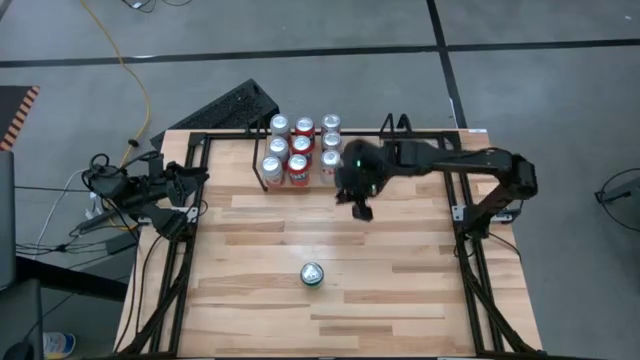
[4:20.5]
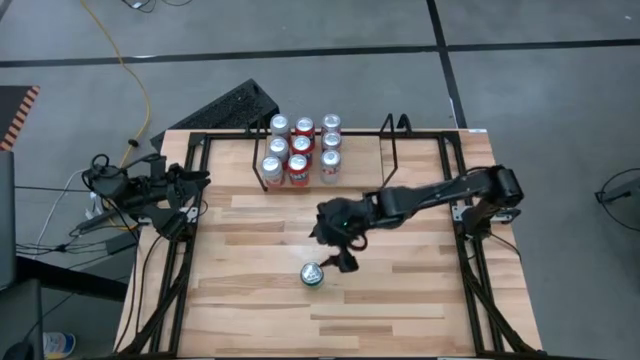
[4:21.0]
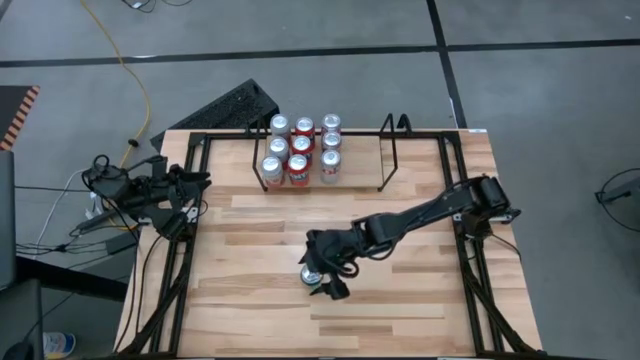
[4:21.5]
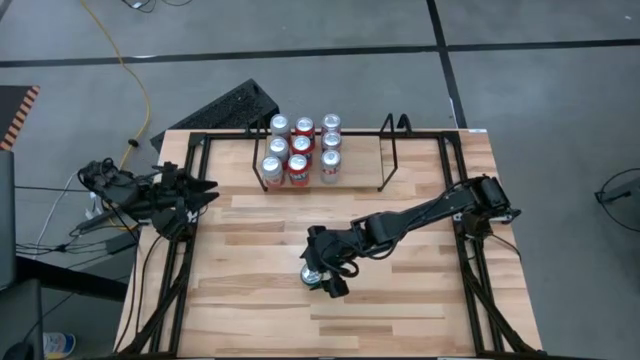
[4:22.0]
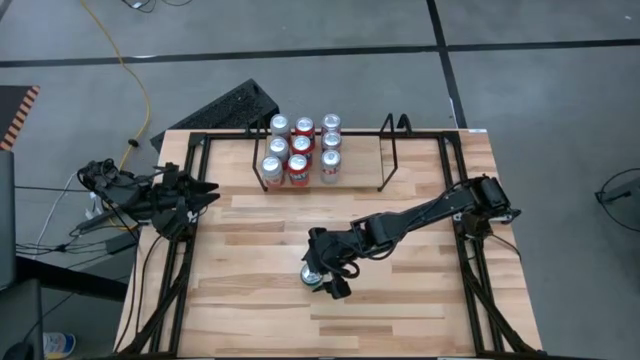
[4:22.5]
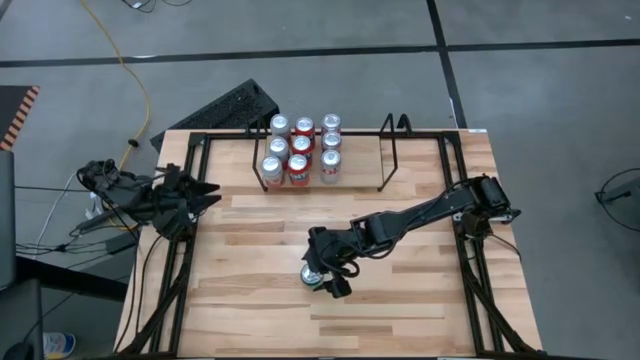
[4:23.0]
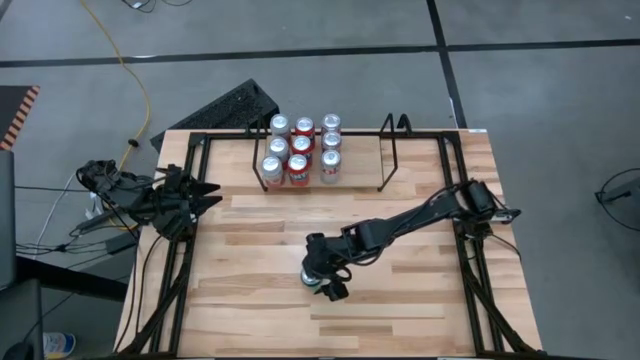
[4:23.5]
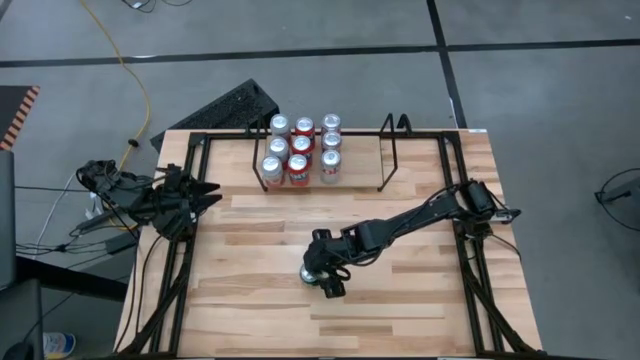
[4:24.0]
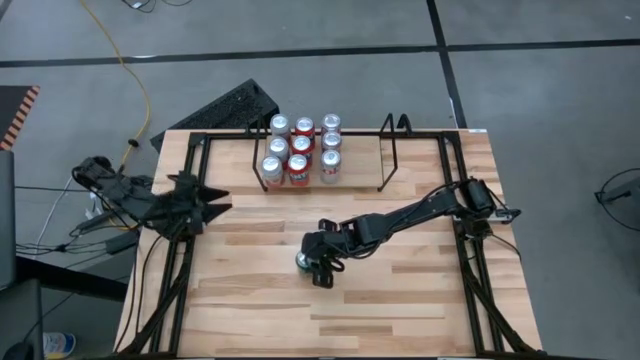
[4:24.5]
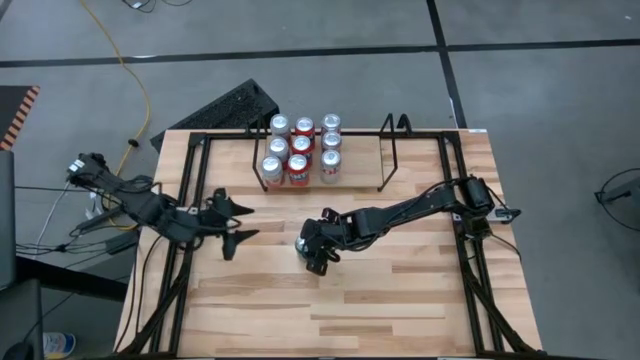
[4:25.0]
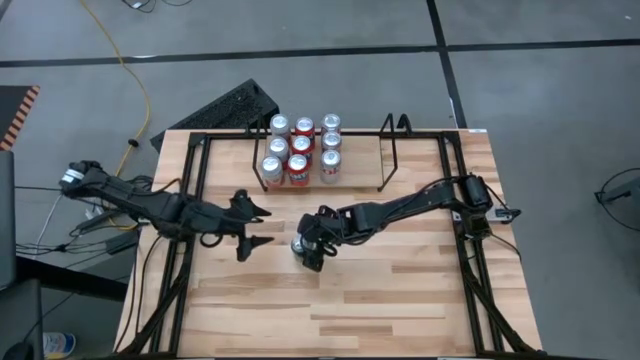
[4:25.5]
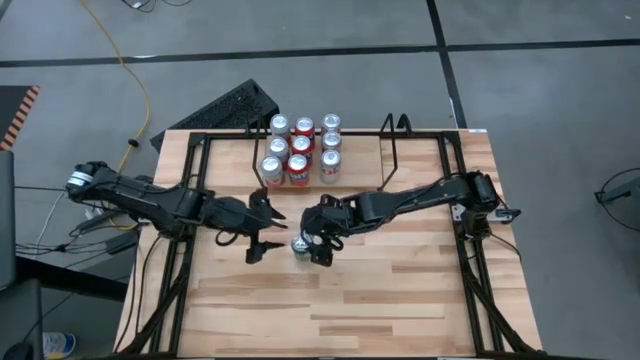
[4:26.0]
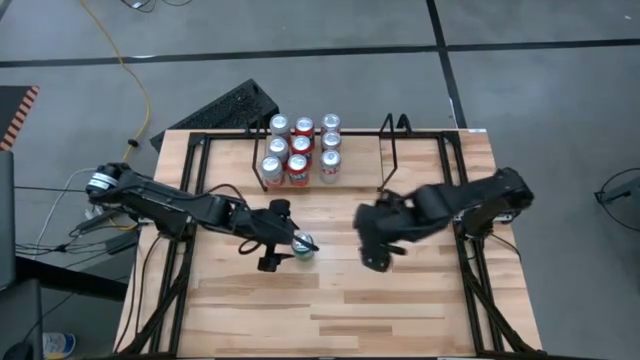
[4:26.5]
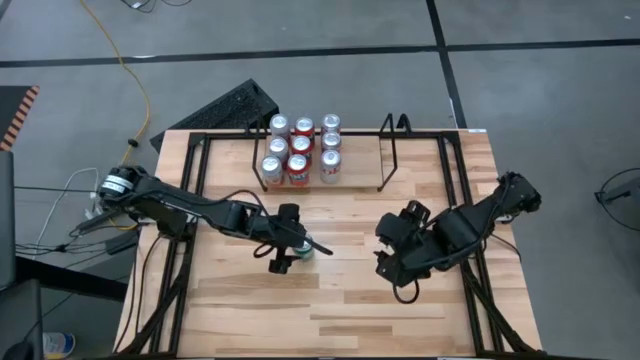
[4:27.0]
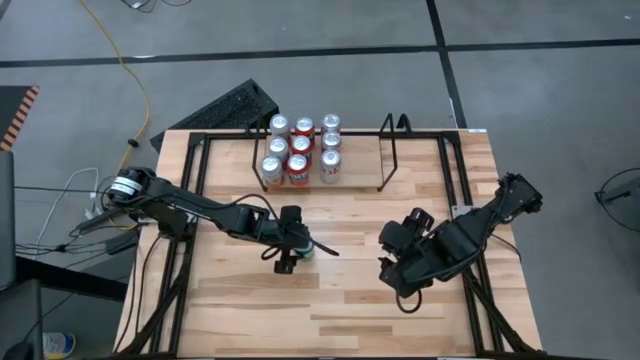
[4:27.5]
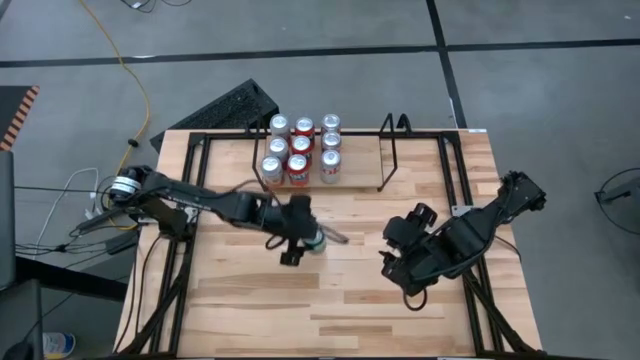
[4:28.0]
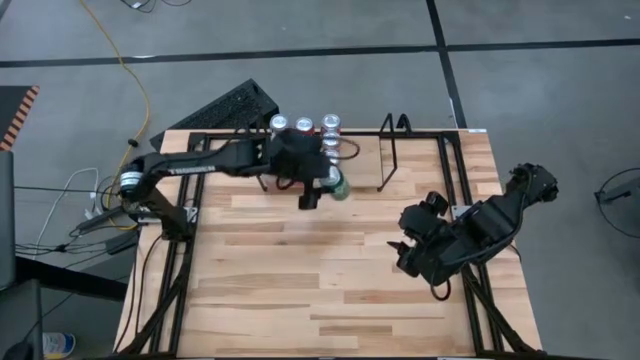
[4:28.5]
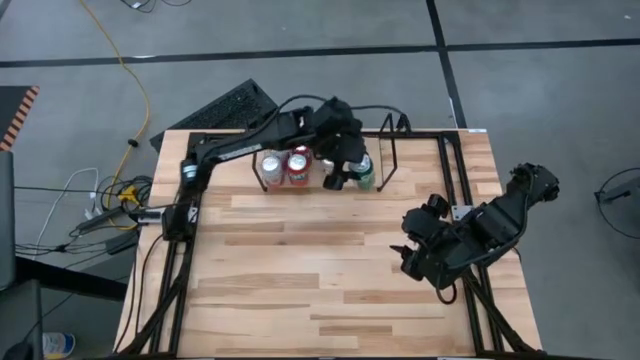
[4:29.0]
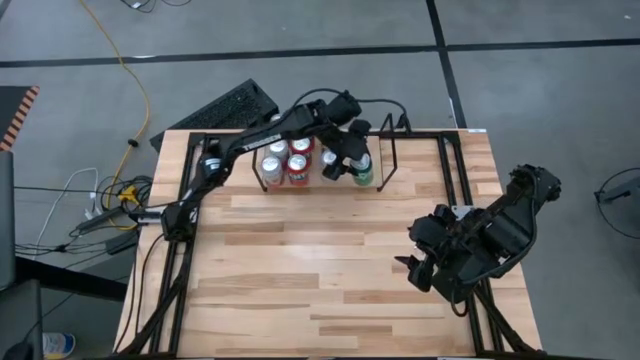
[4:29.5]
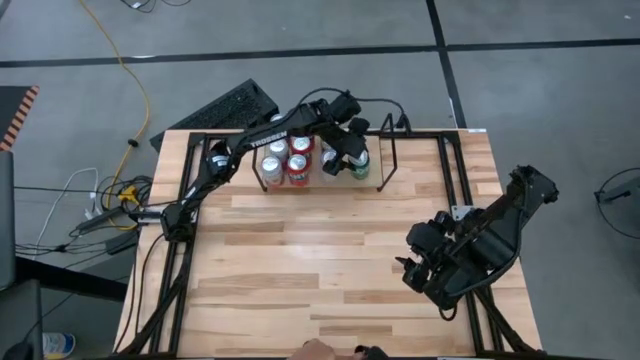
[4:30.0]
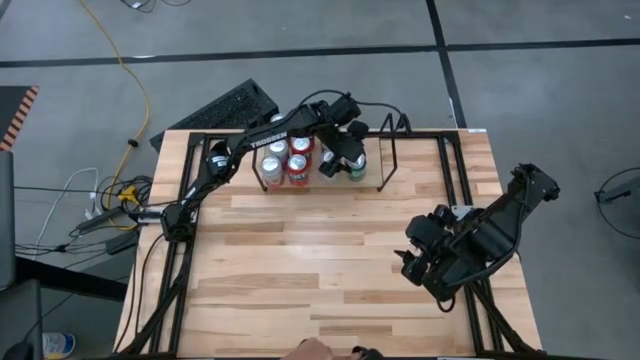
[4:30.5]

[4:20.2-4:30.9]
Task: Place canned beverage on shelf
Put the green soda can on the shelf
